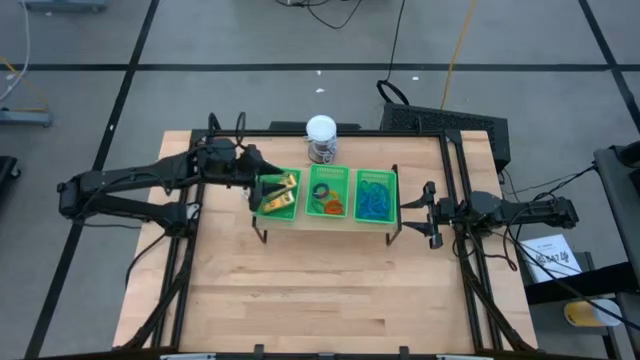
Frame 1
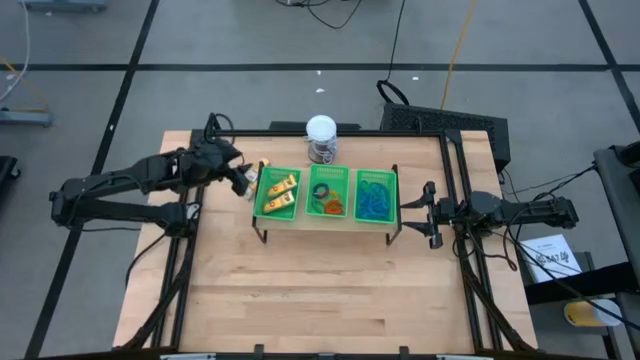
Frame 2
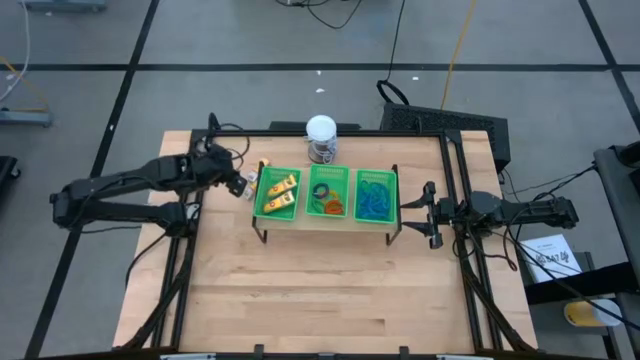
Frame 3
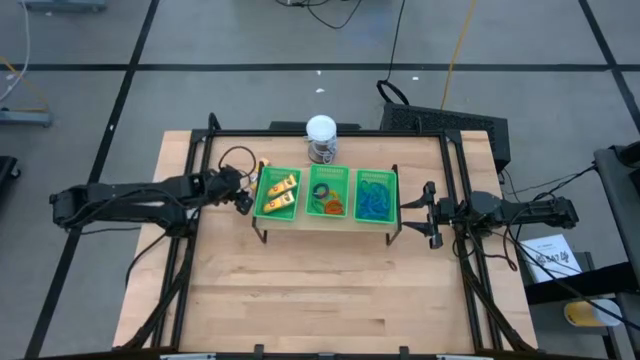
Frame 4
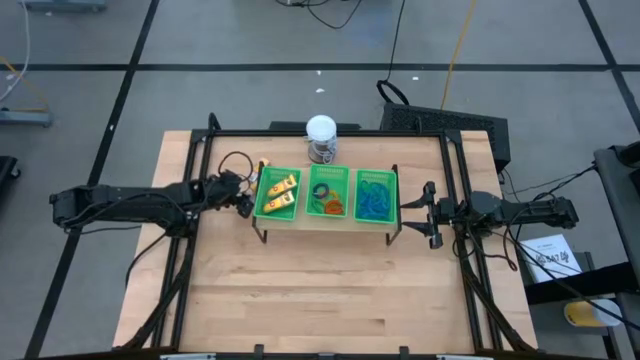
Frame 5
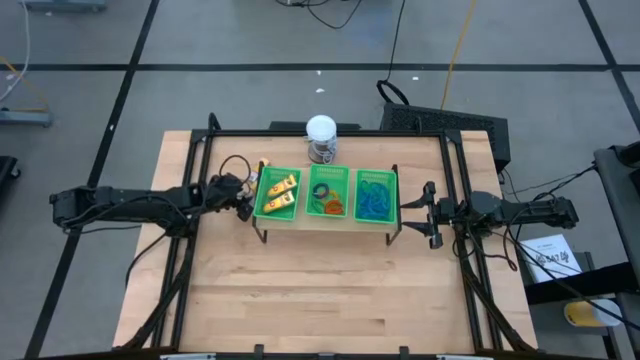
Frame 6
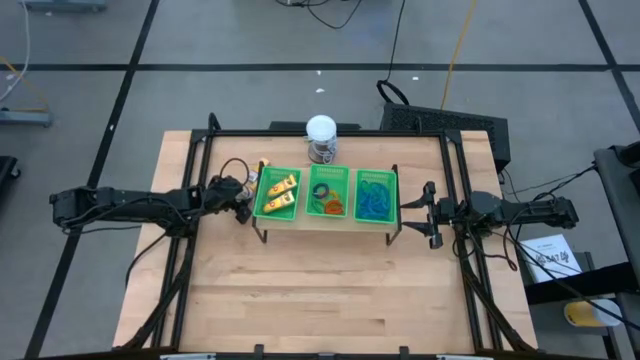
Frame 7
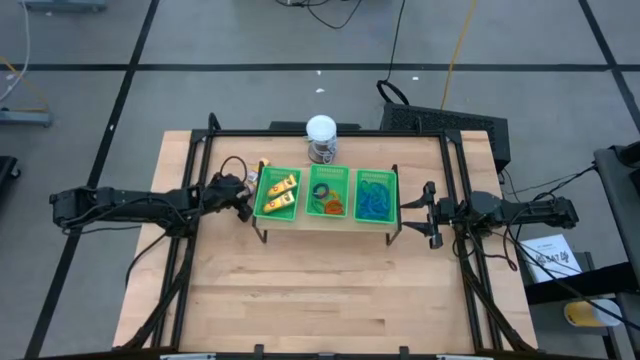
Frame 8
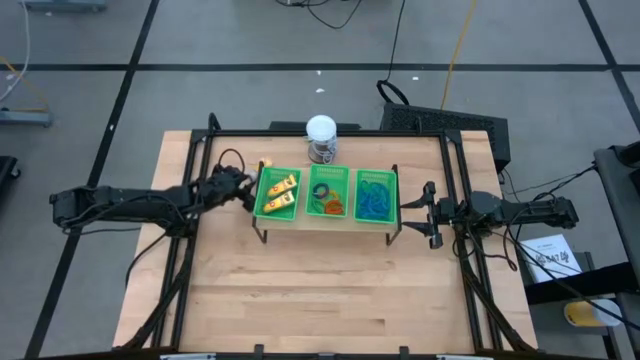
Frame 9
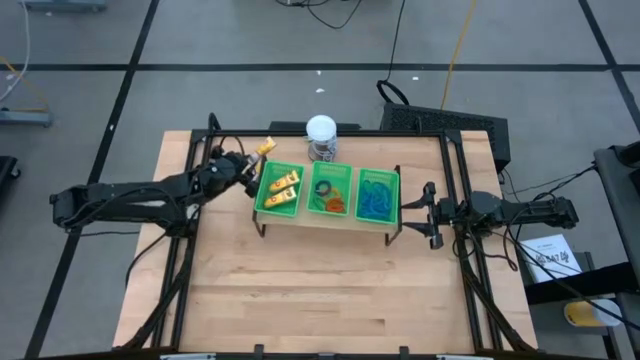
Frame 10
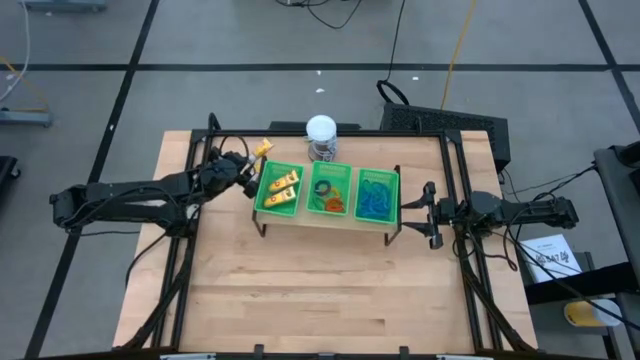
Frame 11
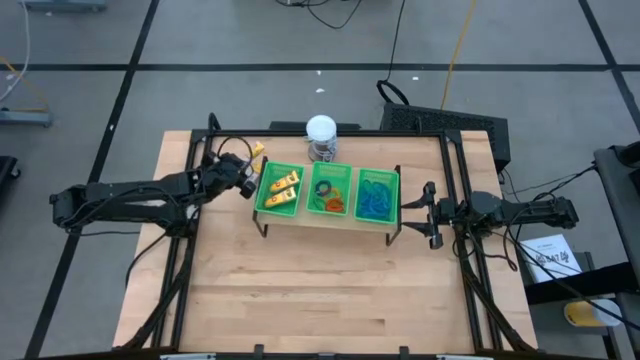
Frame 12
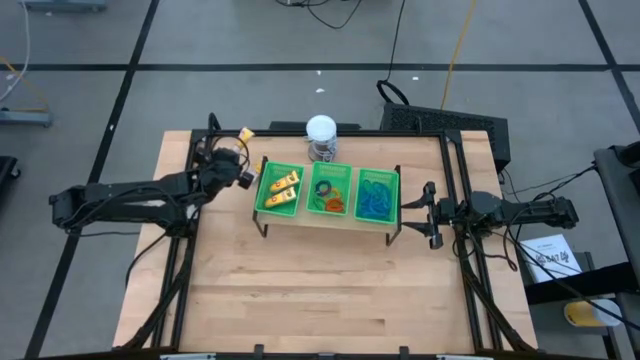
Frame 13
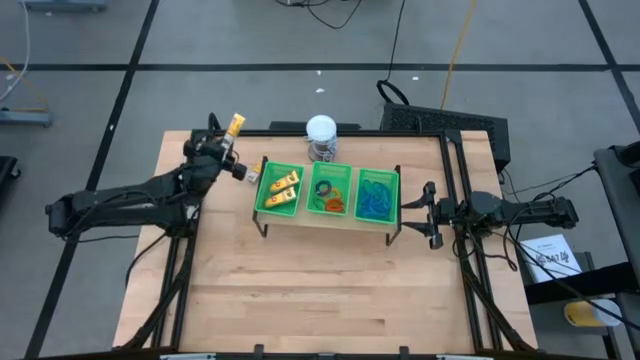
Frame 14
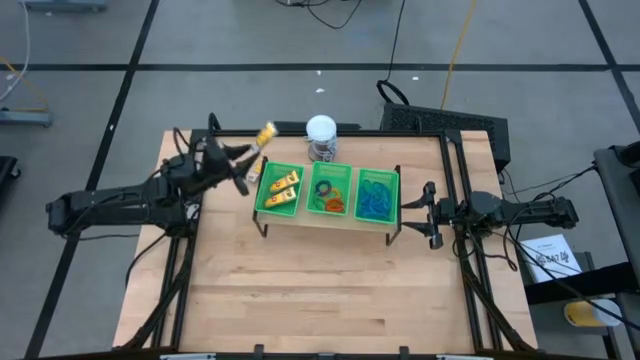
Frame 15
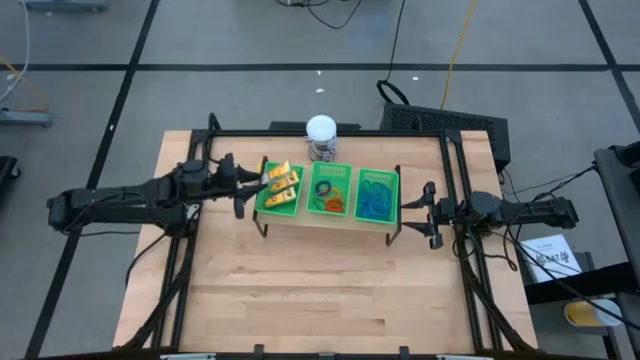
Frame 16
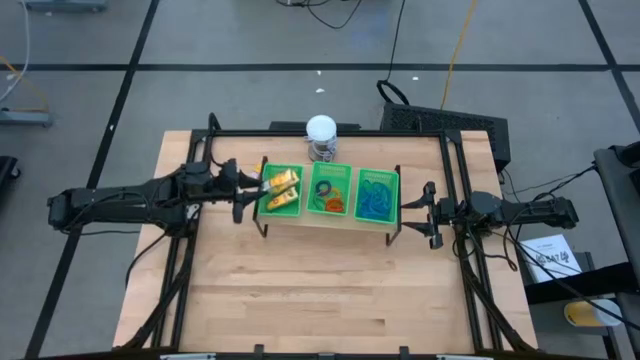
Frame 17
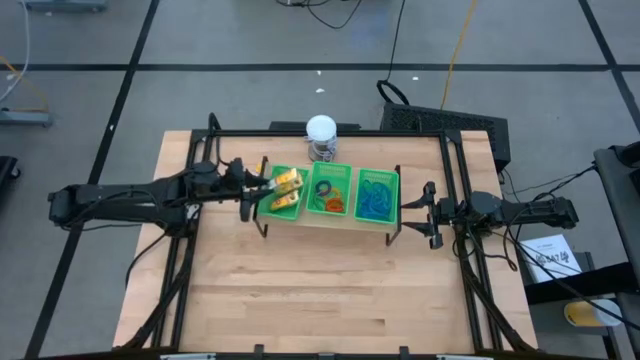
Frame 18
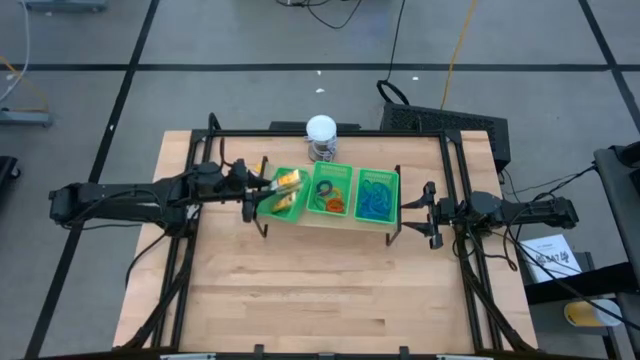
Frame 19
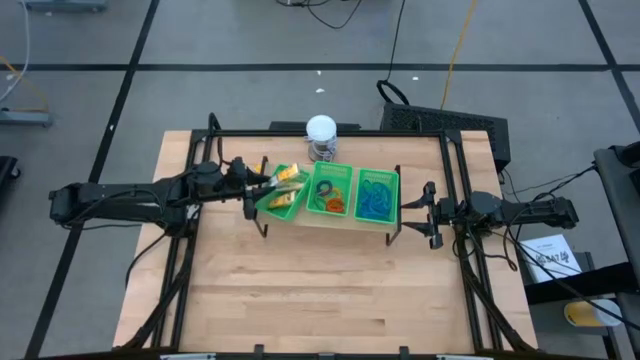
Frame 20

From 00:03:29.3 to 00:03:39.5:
Task: Pick & Place Office Desk Supplies
Put the crayon box into the left green bin on the shelf

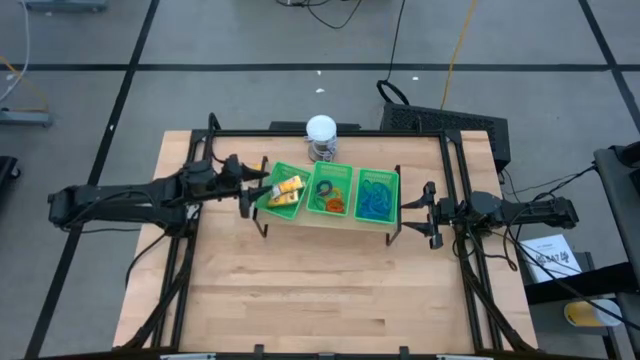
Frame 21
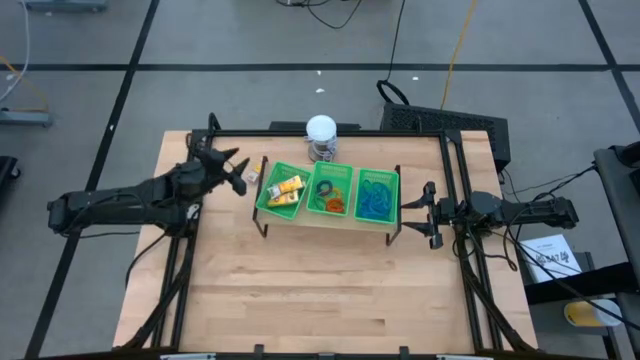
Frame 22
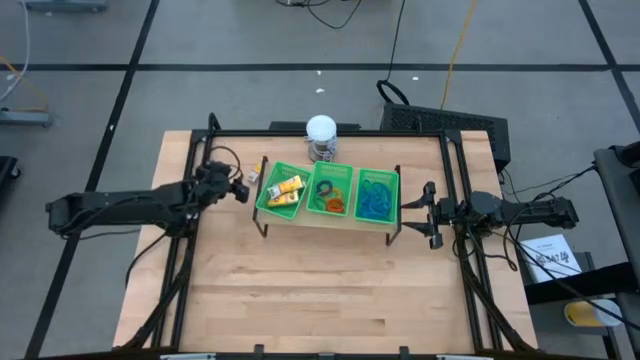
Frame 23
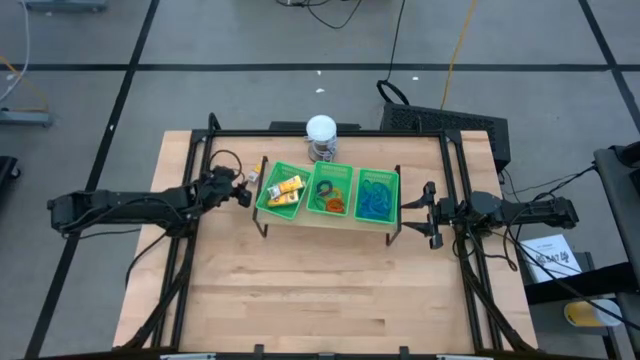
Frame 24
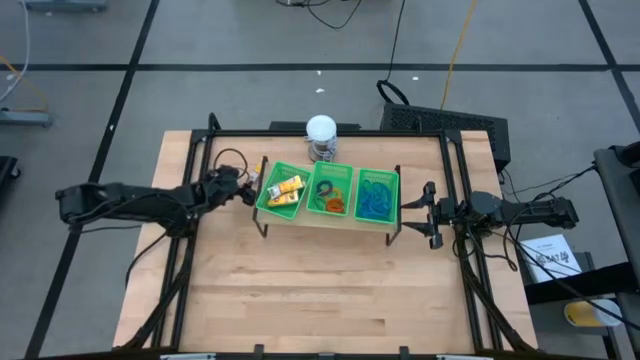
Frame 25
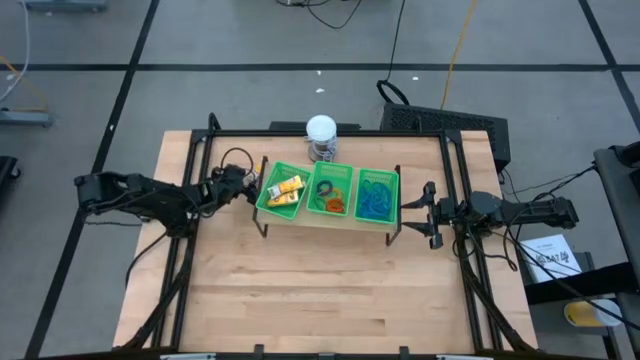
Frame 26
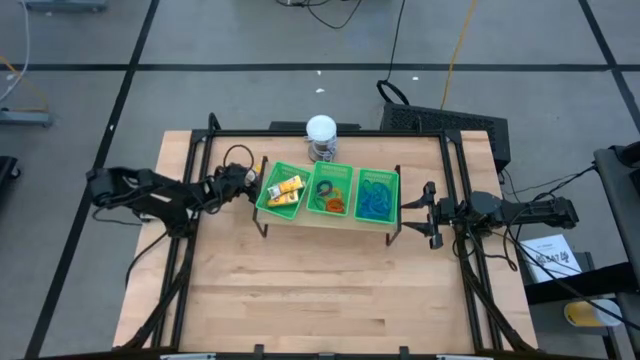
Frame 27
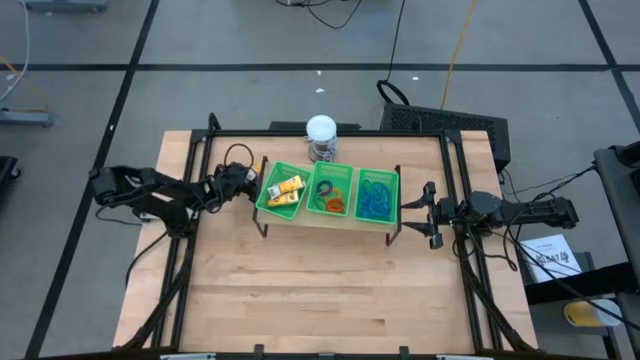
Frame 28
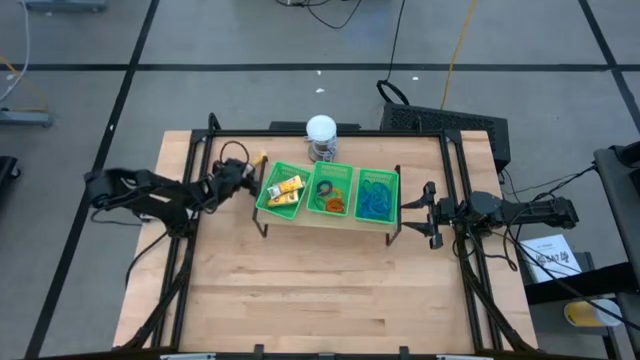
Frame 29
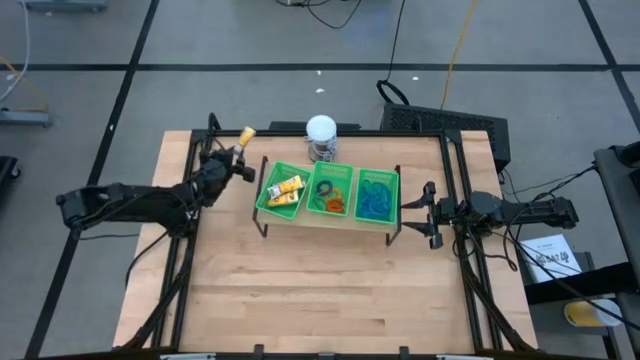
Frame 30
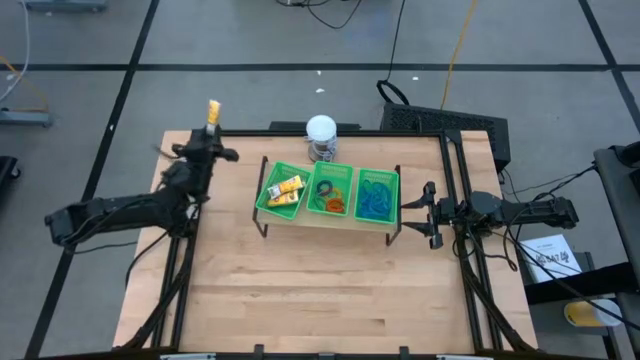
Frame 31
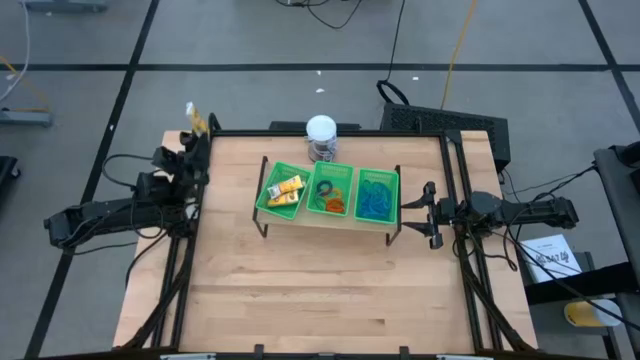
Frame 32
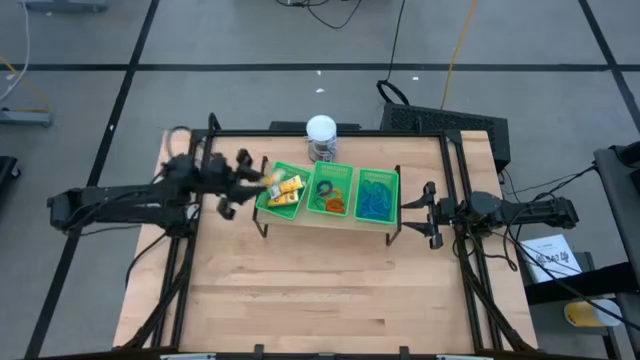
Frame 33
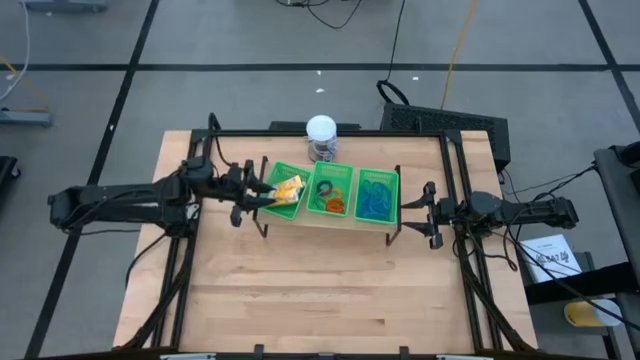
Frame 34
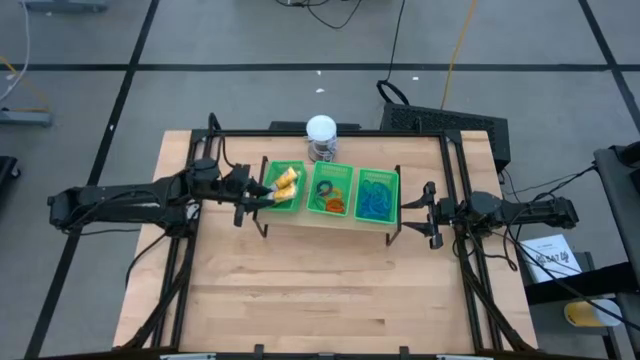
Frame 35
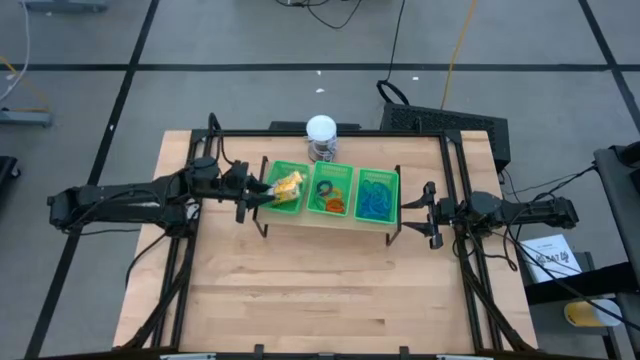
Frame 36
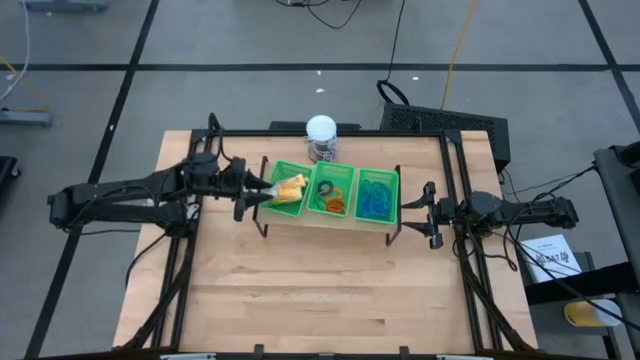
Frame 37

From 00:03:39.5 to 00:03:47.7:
Put the crayon box into the left green bin on the shelf

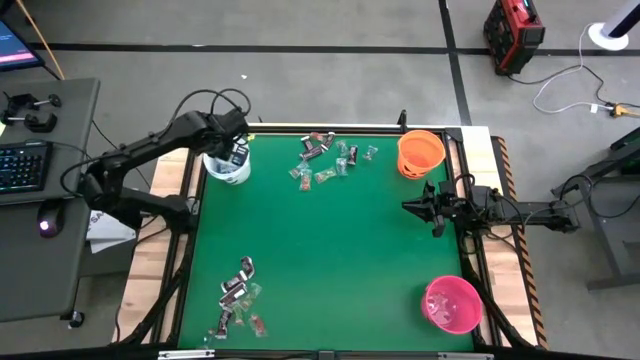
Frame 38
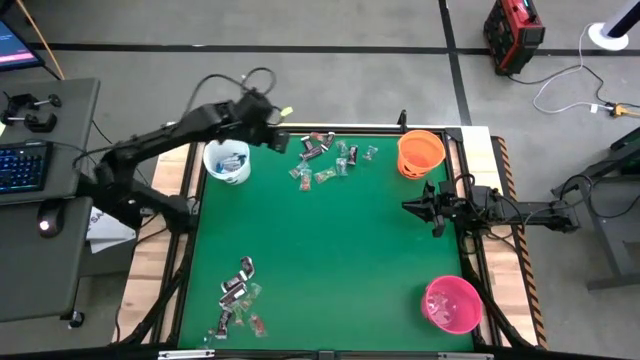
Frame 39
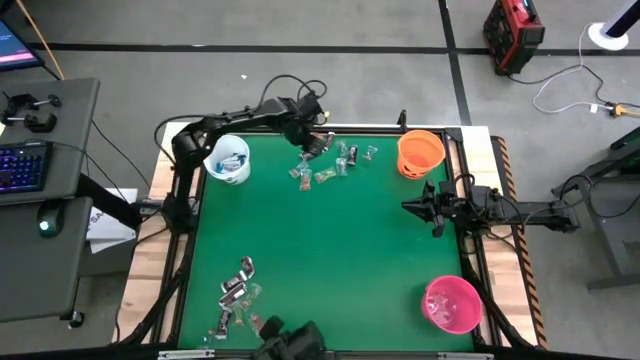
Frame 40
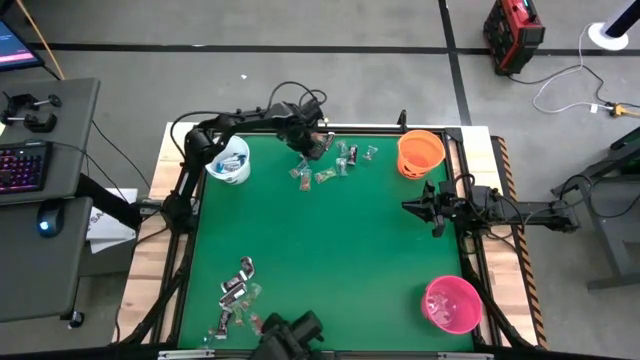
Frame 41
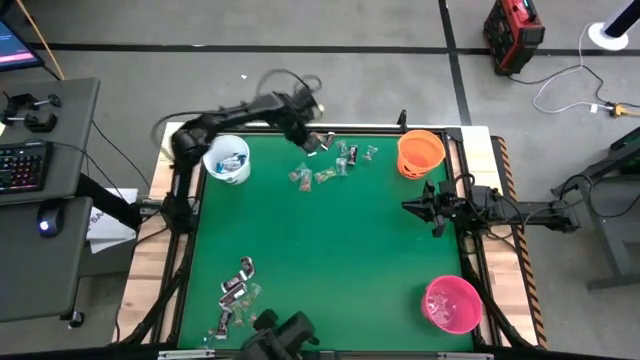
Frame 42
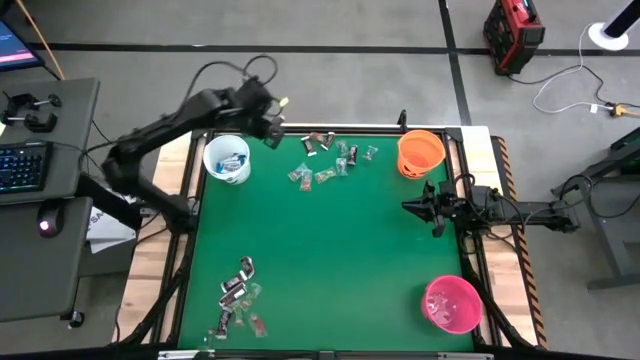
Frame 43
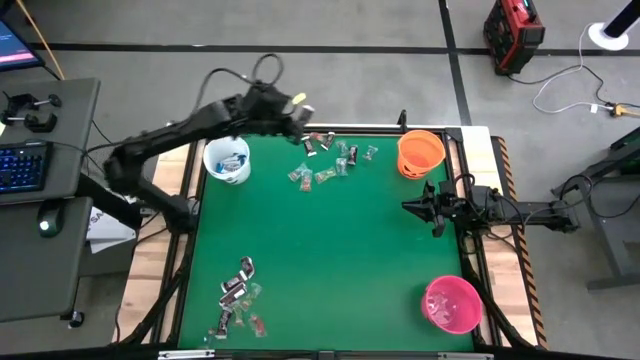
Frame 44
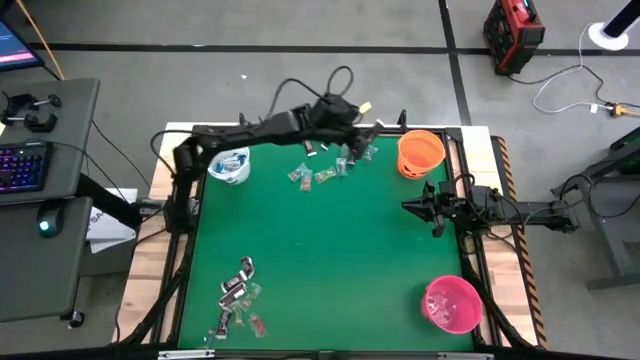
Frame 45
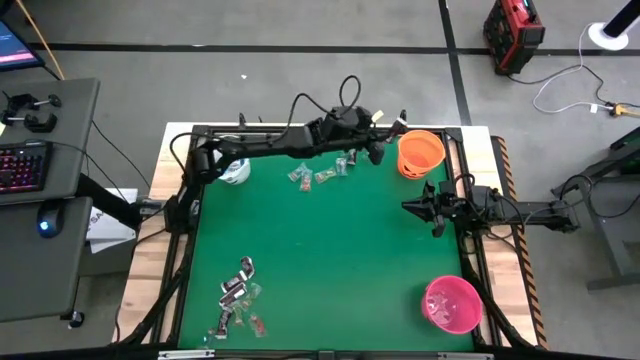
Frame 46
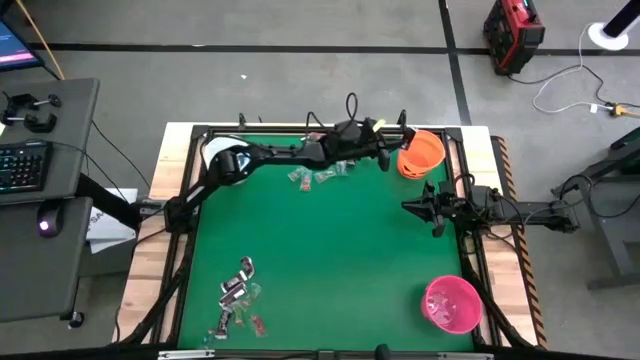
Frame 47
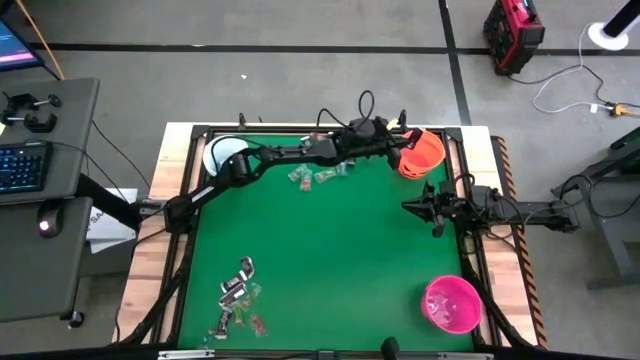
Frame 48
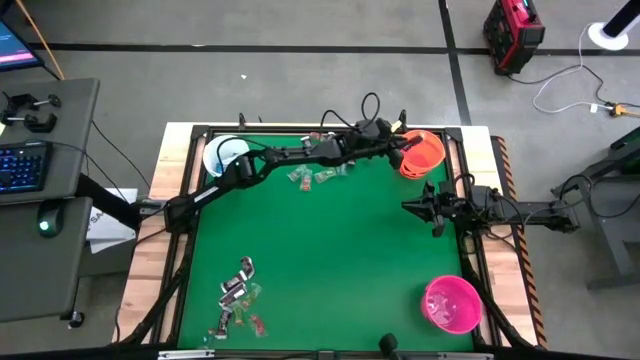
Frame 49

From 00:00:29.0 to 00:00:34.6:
Task: Sort candy by brand, put in halloween buckets
Put the brown chocolate bar into the orange bucket
